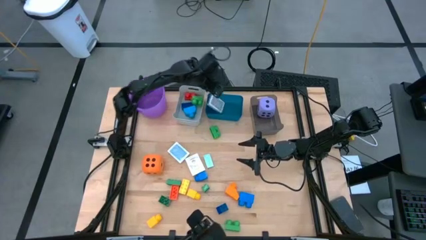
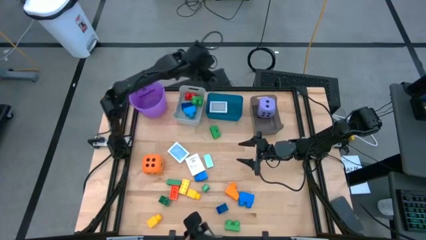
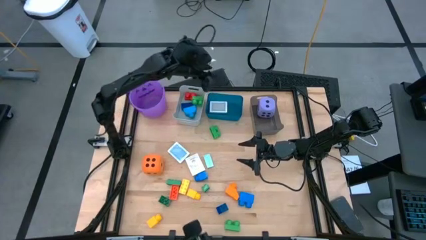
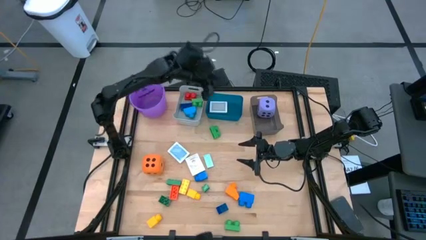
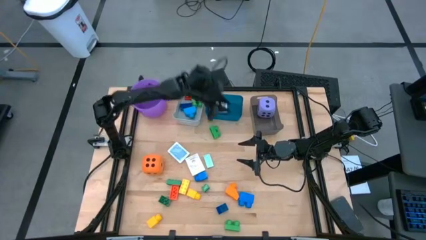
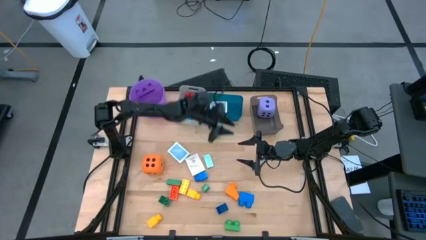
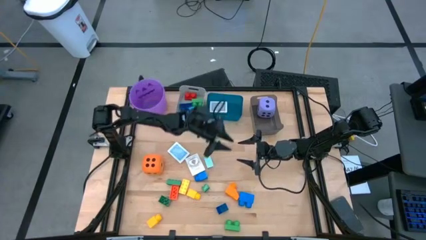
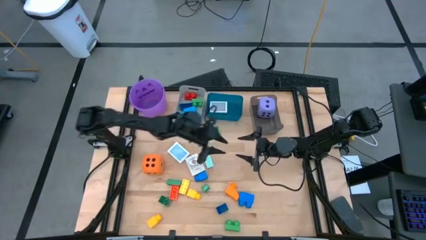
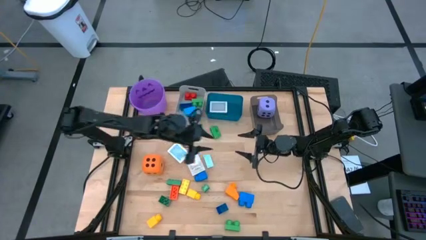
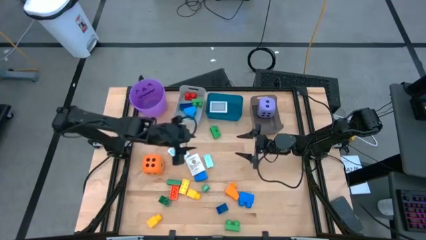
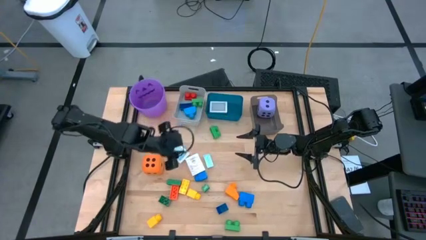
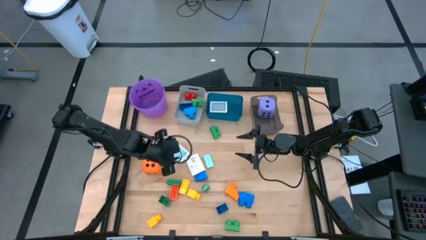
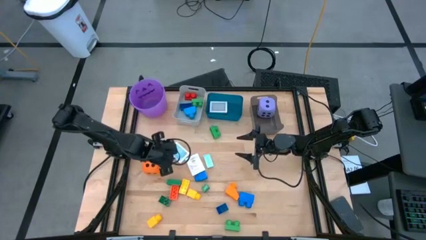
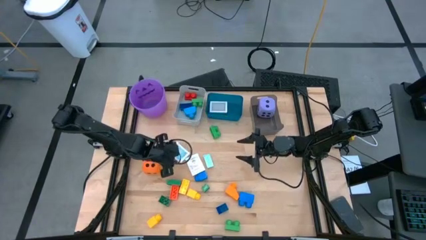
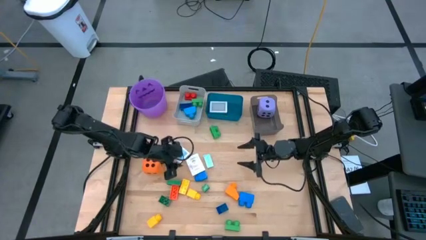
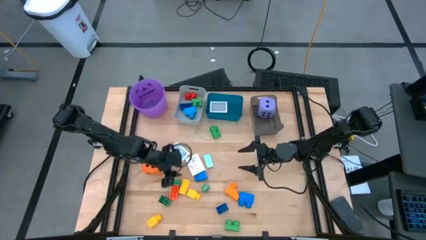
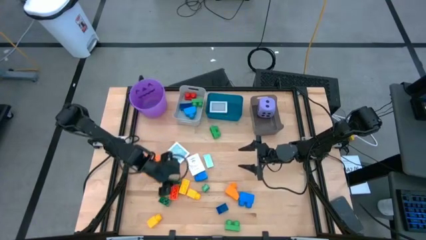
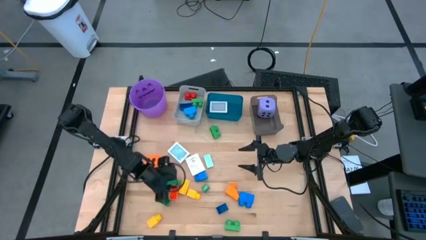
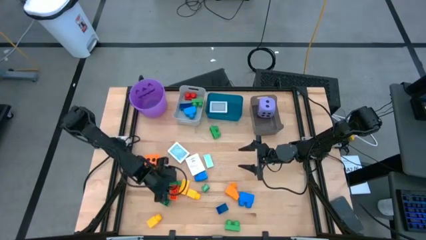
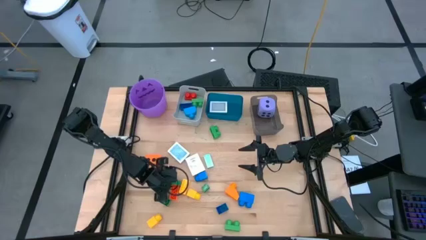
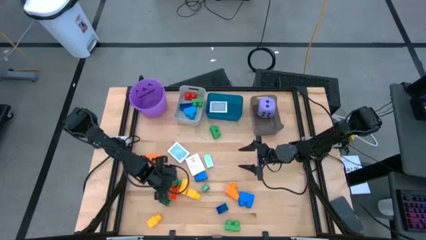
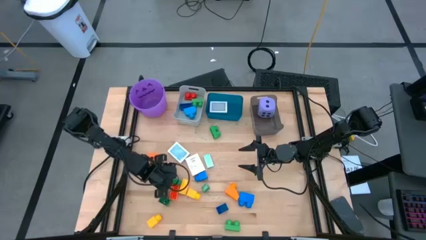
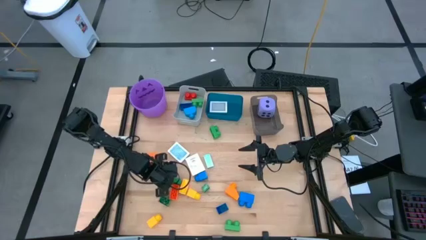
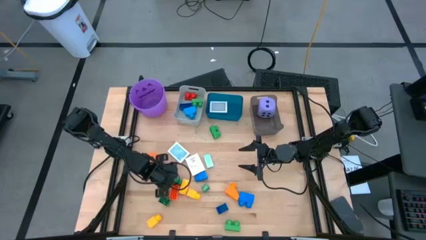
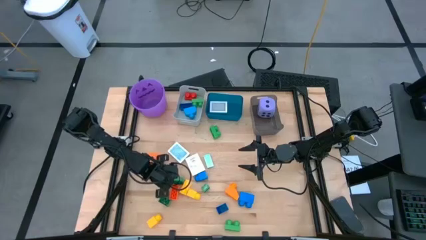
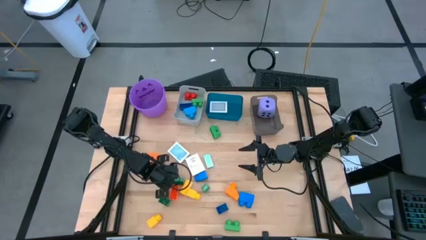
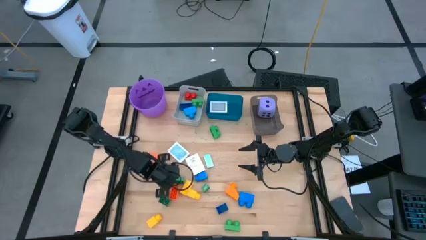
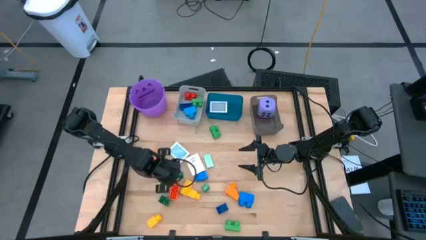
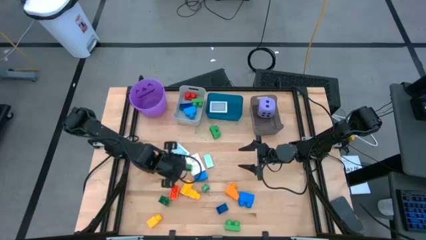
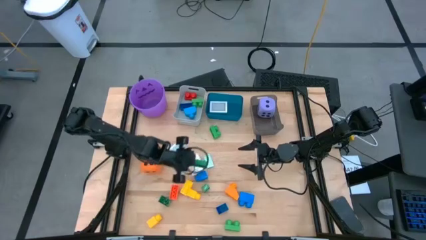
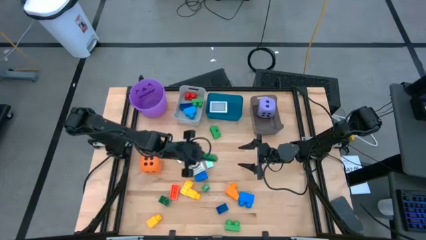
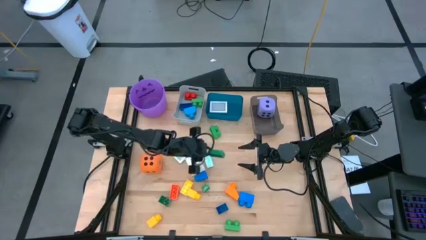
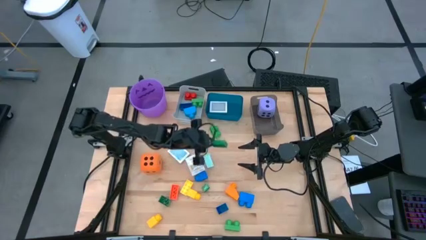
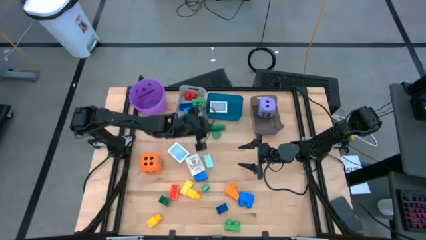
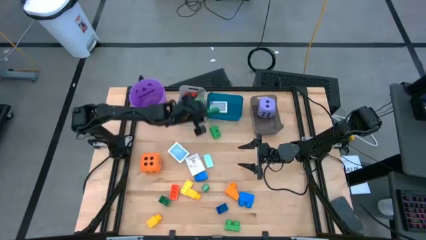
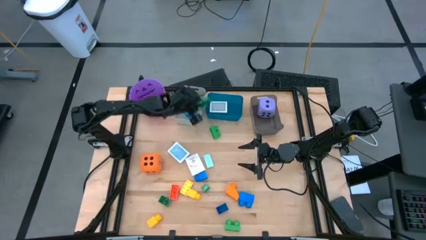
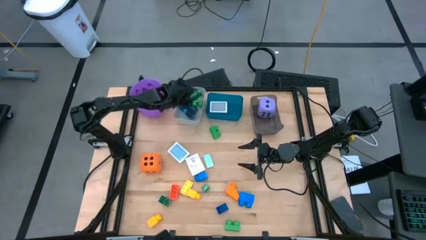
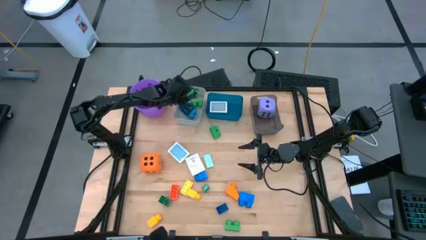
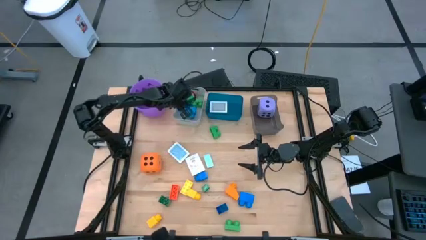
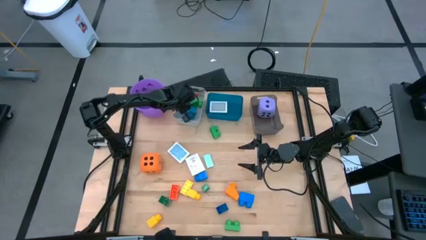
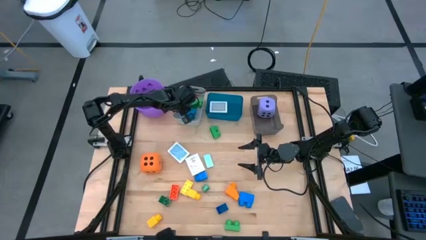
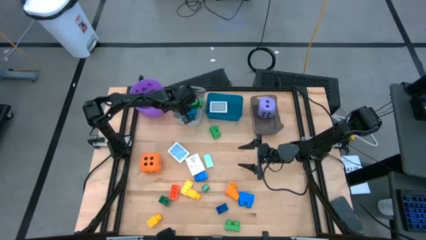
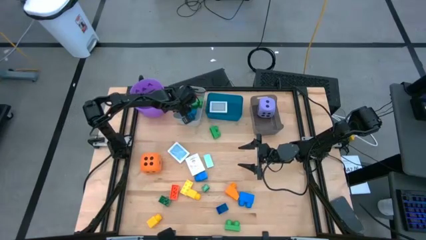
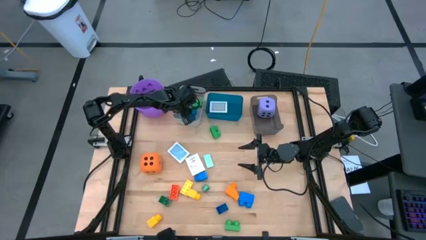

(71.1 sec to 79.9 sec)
Task: Pick & Place Toys
Put the dark green game piece into the gray bin

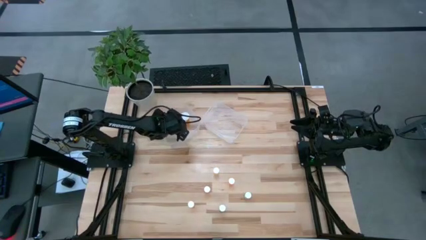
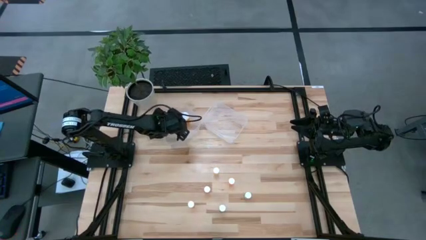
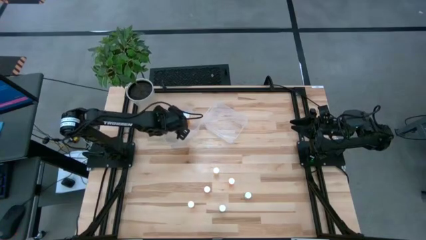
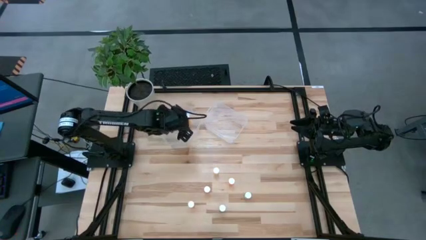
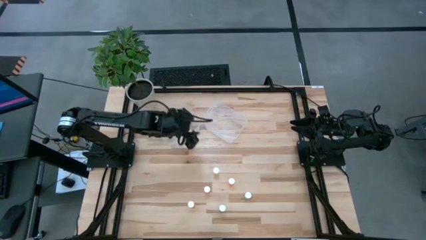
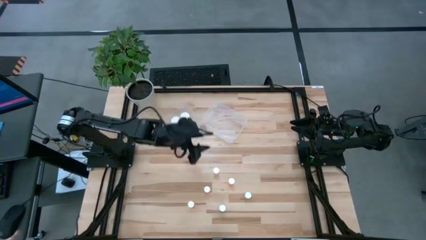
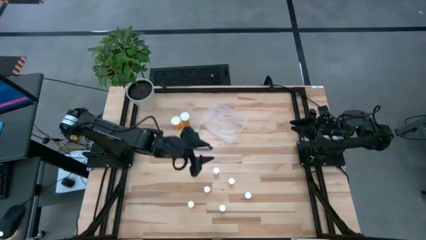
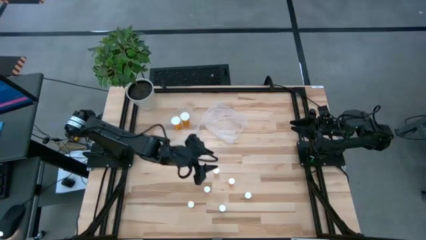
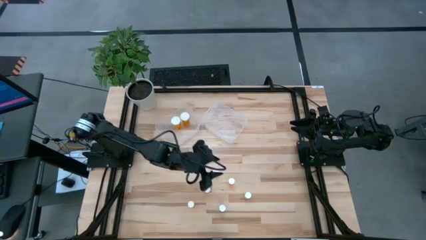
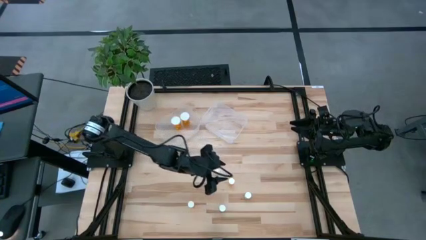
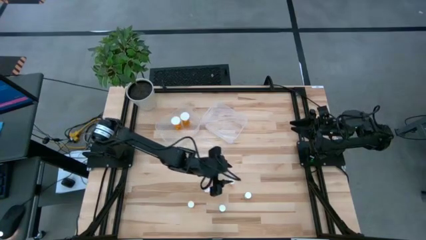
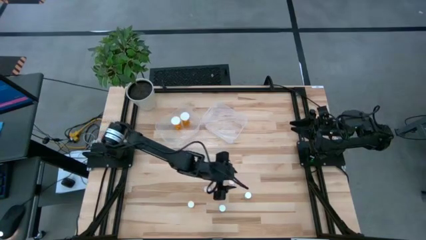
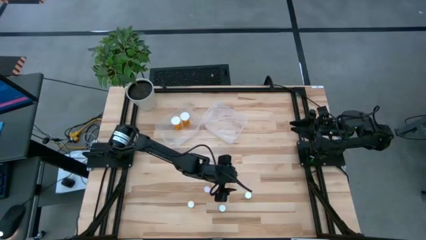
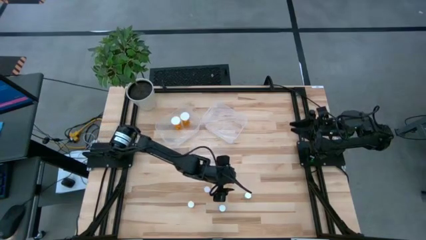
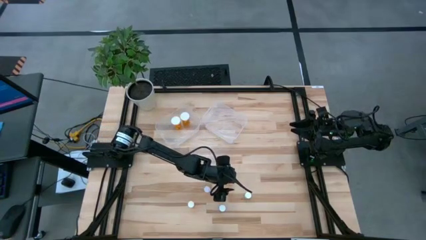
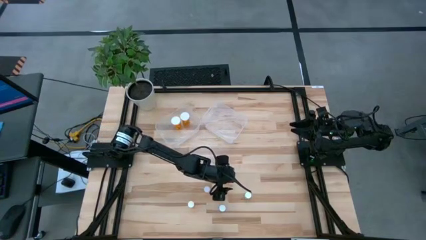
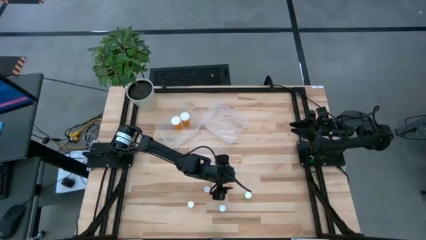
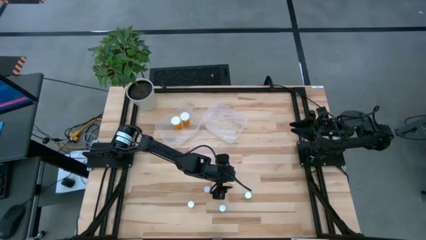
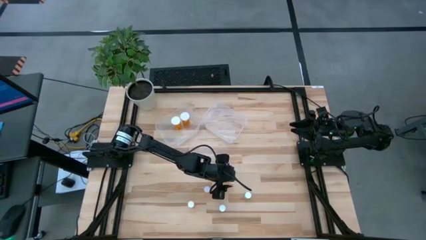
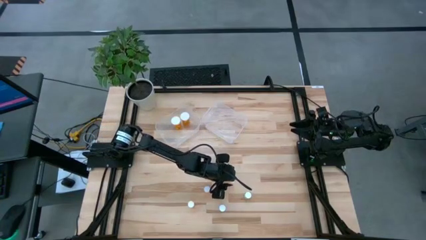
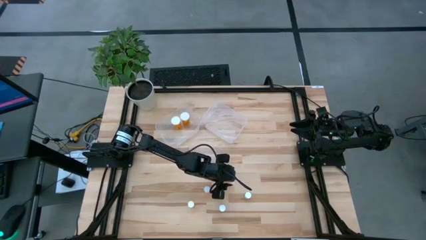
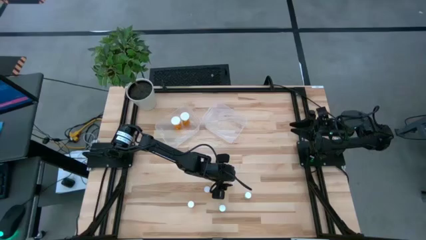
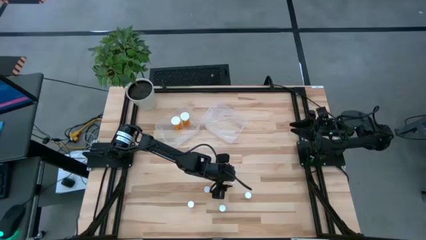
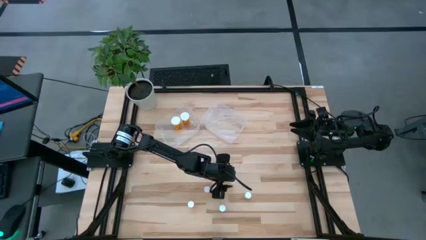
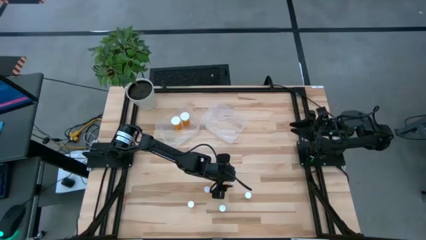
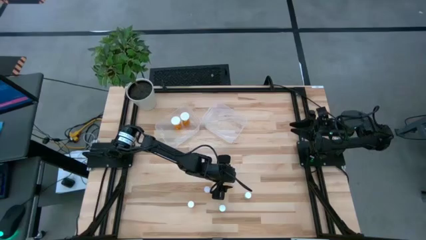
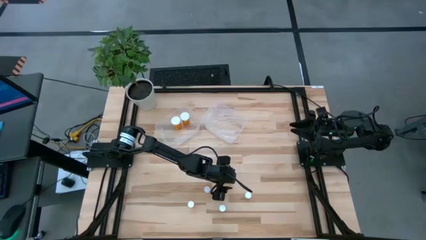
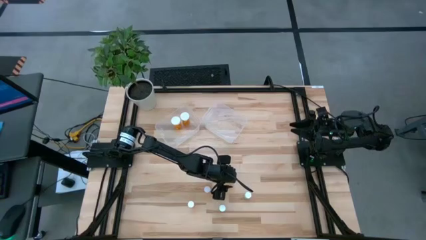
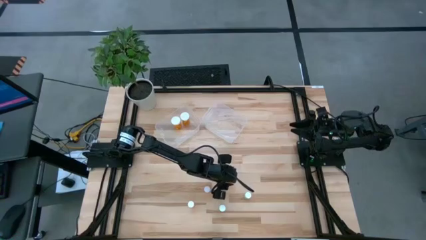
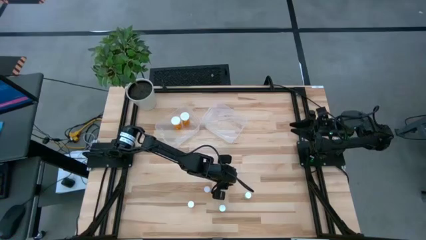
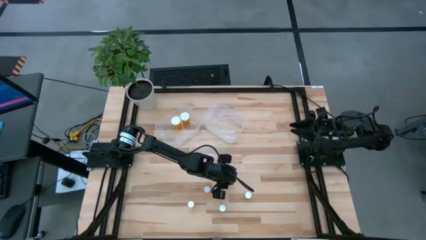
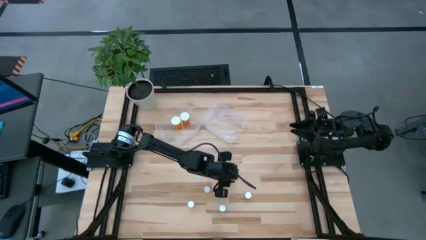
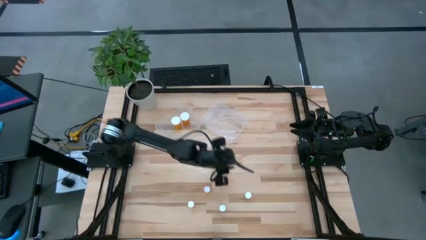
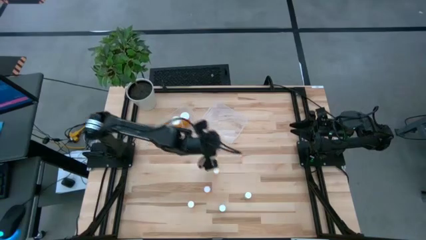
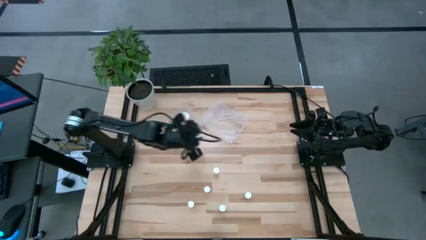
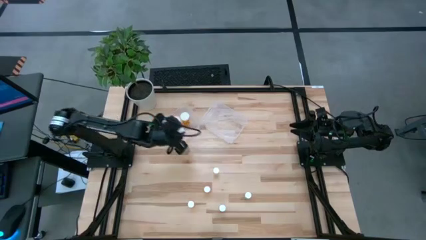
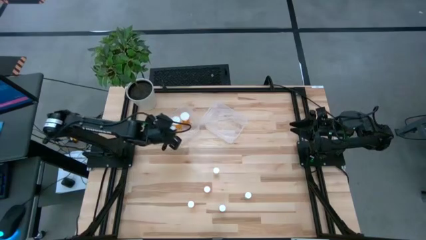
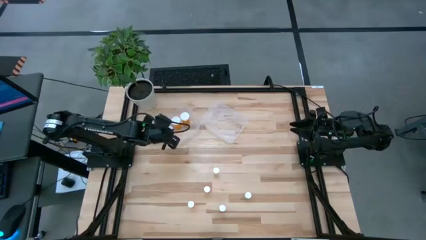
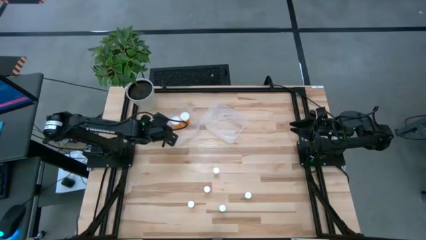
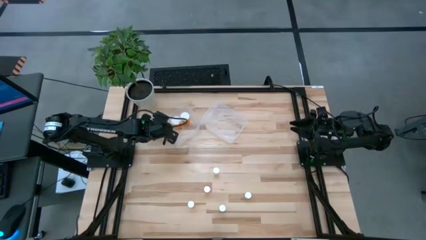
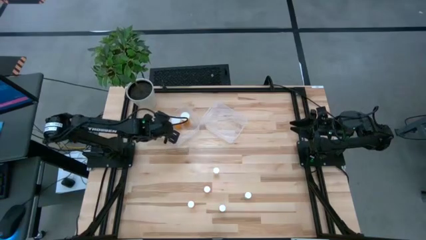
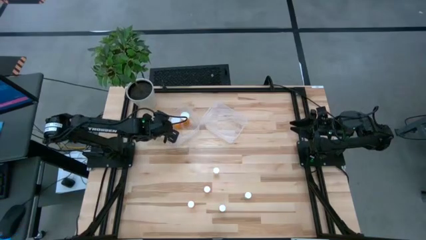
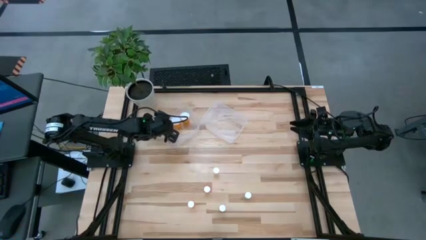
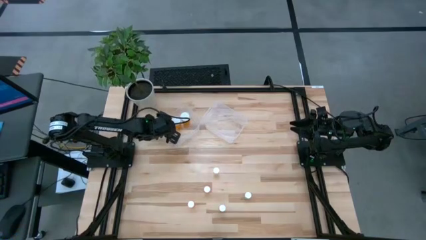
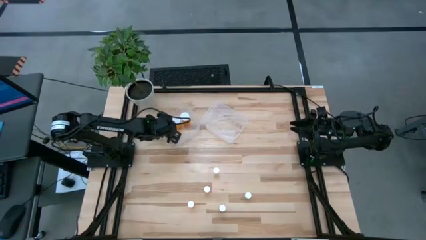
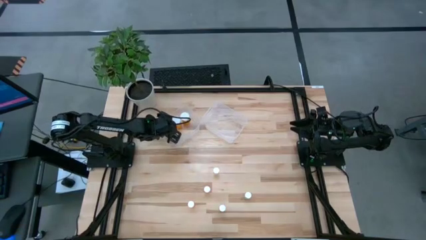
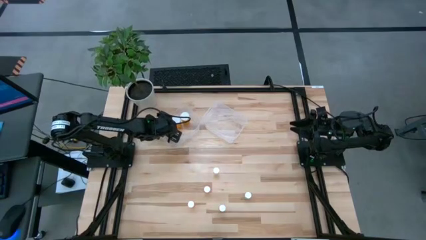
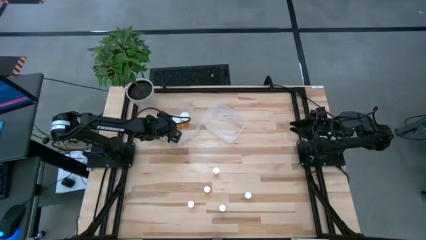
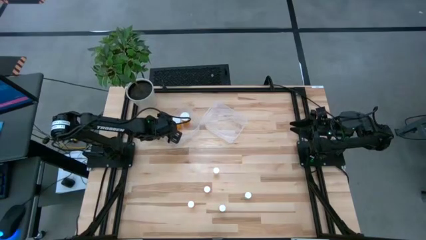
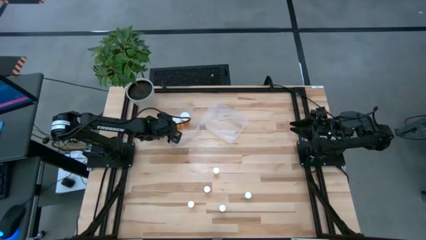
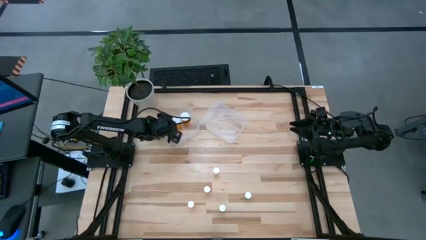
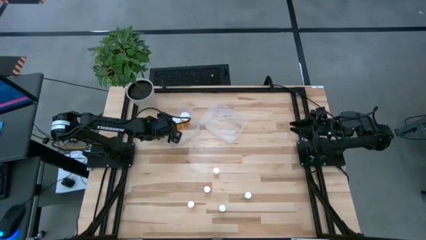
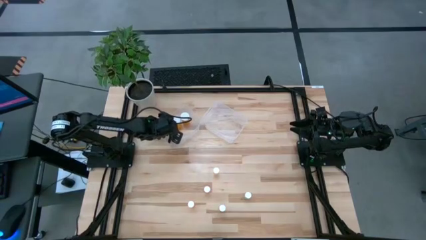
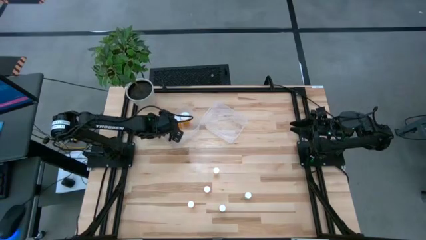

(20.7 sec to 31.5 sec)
Task: Pick and place medicine bottles into bin by pill shape (circle, oval)
Put the top small orange capsule bottle into the left transparent bin
